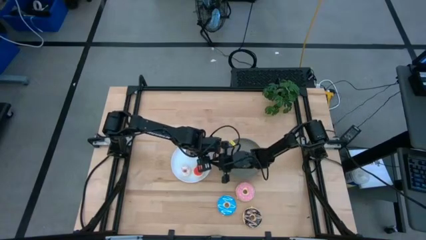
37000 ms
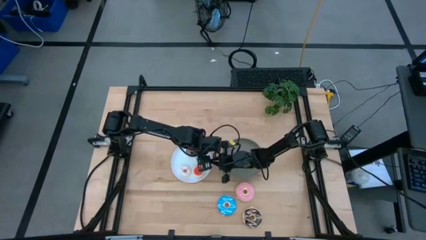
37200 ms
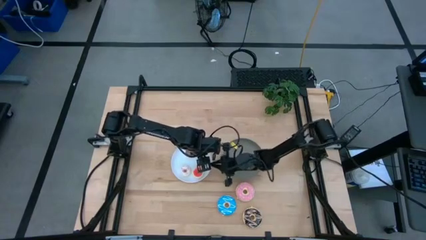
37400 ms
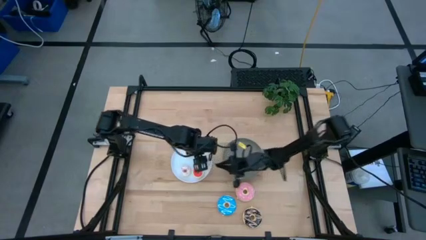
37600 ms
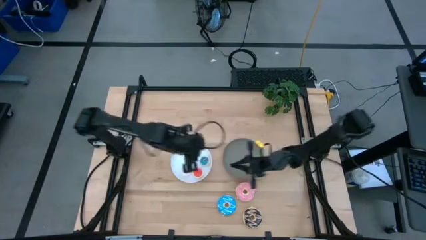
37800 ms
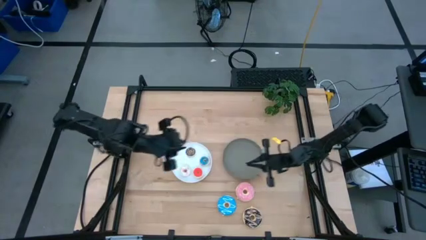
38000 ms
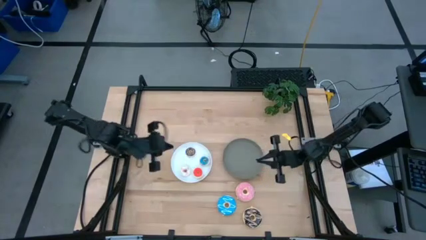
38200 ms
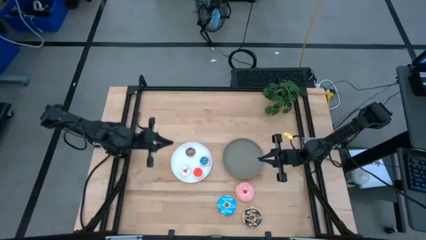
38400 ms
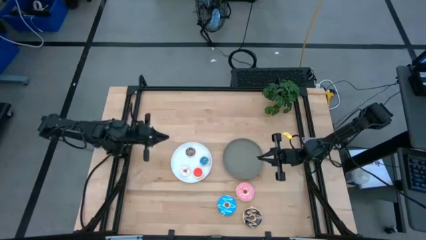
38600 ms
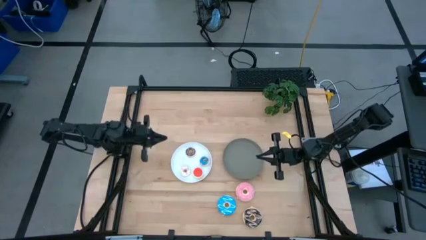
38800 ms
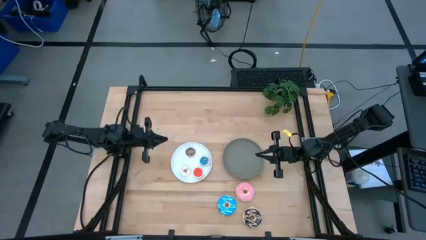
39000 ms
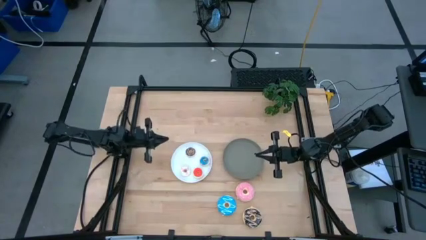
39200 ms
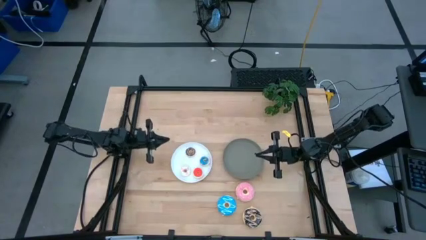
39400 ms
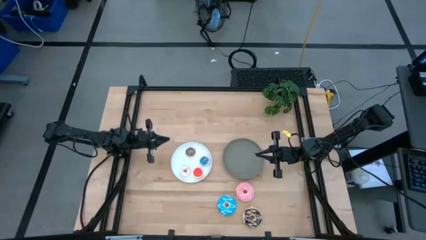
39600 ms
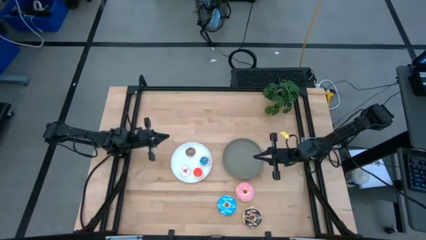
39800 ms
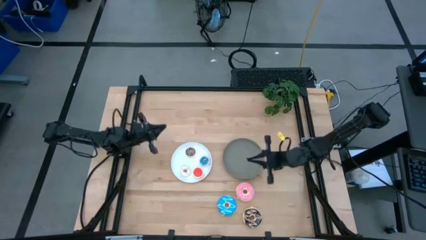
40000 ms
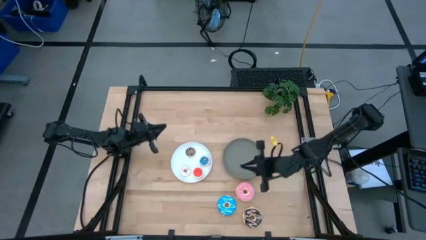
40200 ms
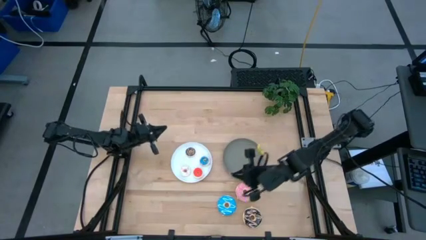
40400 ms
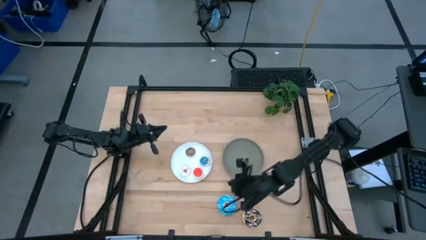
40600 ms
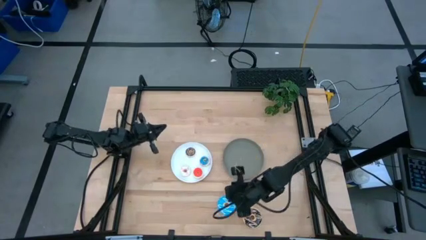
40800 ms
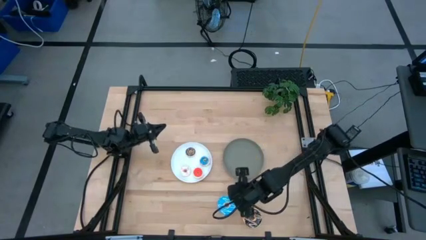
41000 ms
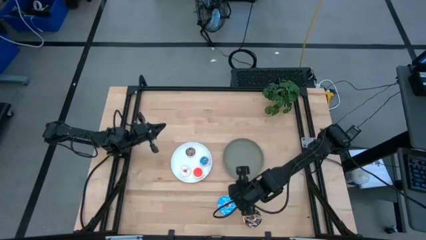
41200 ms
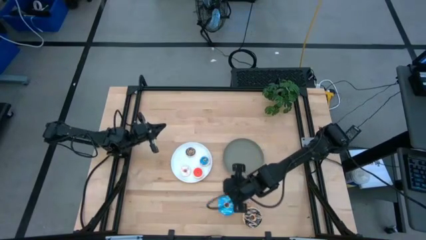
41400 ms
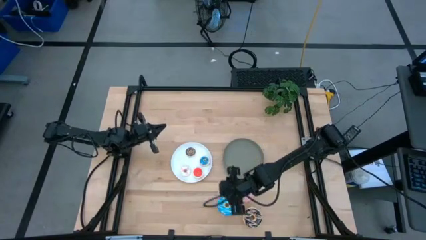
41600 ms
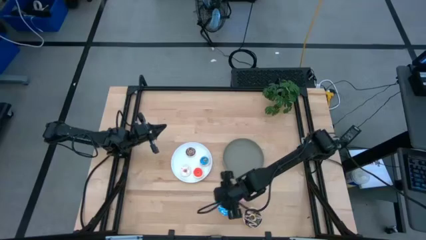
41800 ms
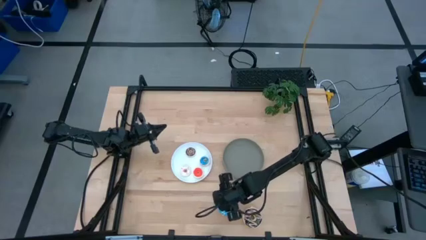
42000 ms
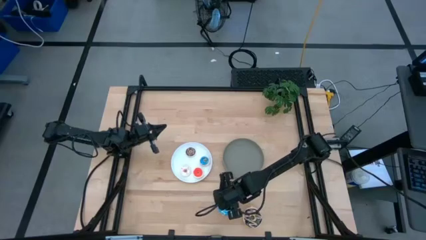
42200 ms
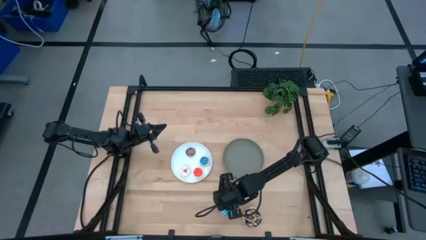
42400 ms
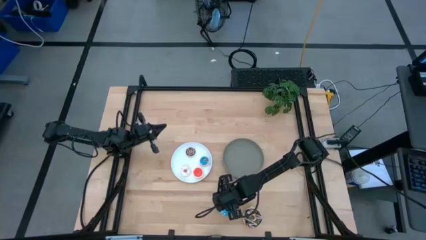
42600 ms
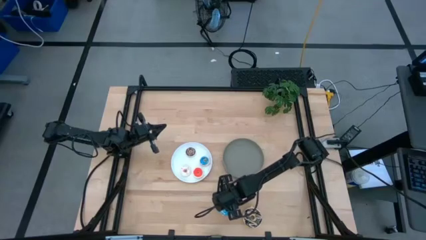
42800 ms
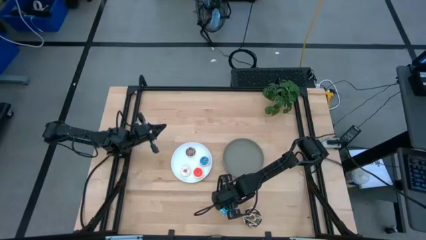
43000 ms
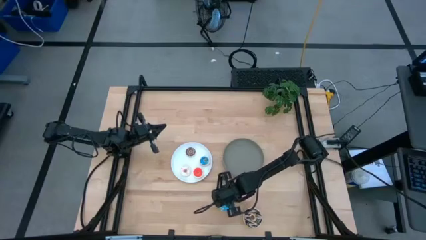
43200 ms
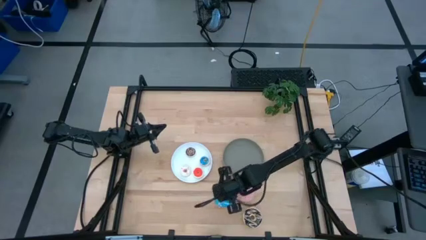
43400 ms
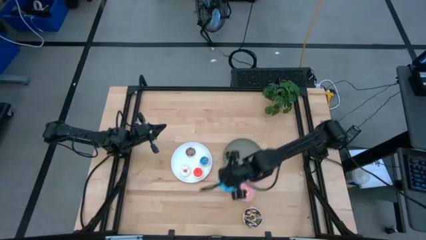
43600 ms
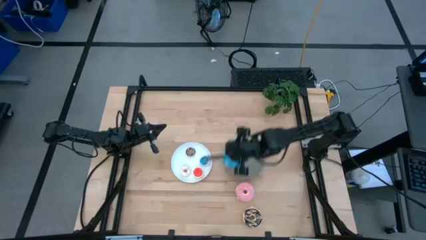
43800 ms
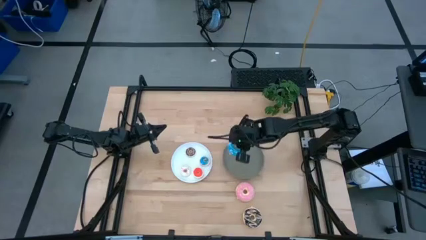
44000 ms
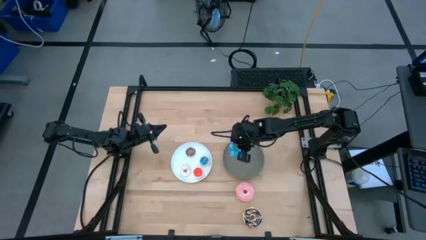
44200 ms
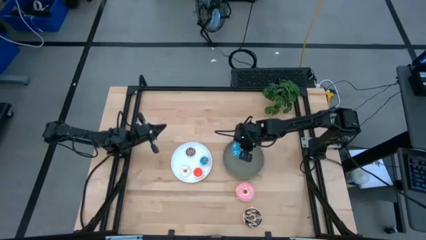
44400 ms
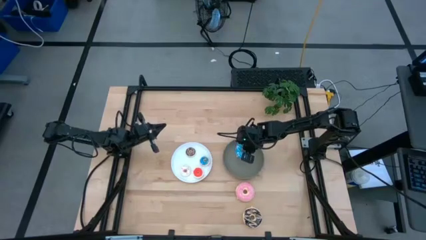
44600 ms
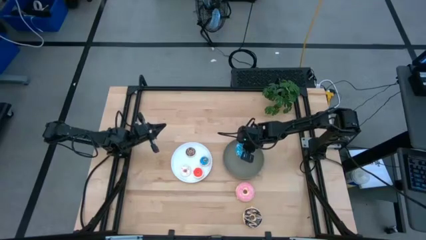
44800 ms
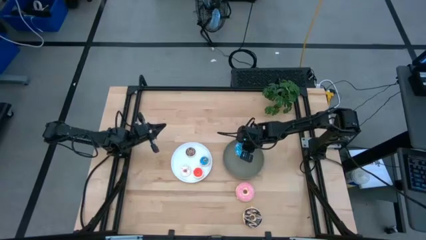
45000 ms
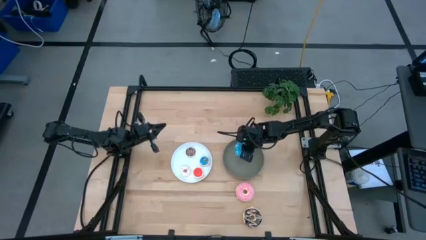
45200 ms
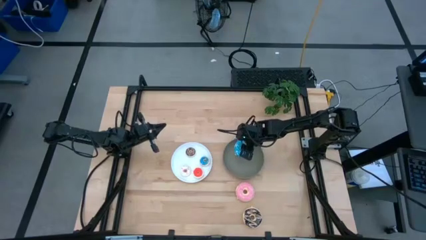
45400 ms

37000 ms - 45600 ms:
Task: Pick & Place donuts
Put the large blue donut on the gray plate

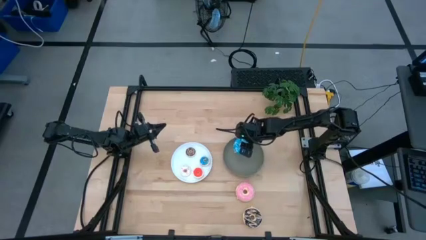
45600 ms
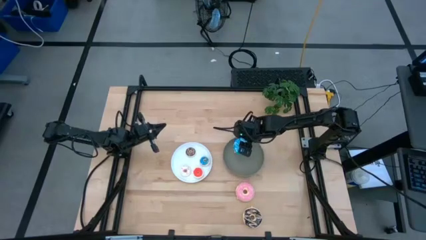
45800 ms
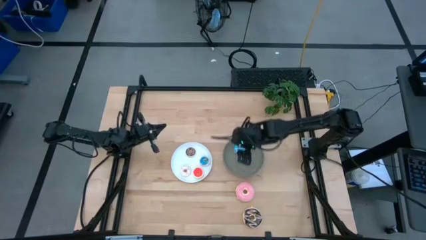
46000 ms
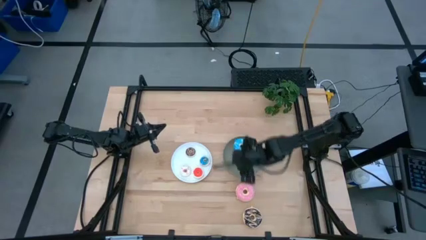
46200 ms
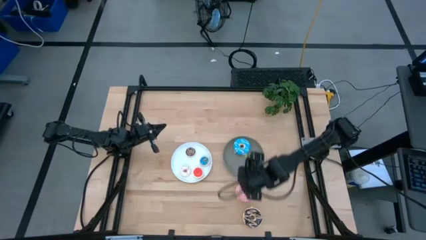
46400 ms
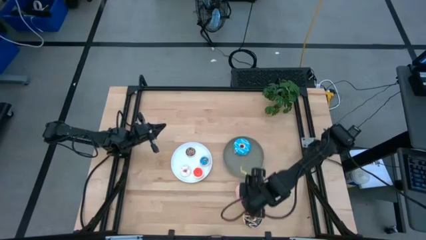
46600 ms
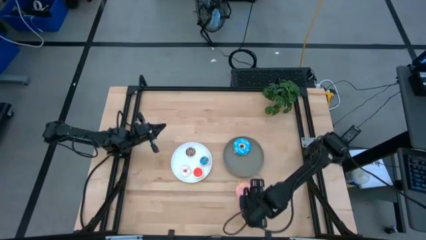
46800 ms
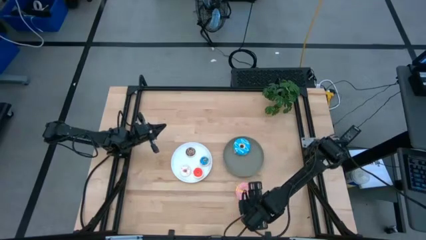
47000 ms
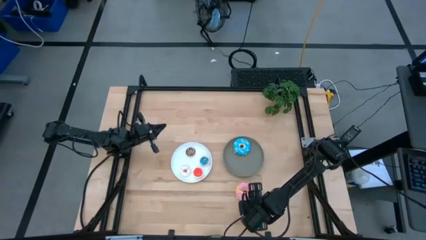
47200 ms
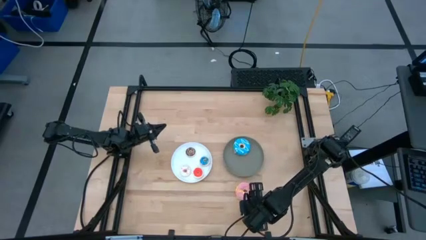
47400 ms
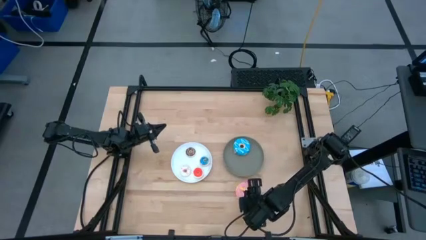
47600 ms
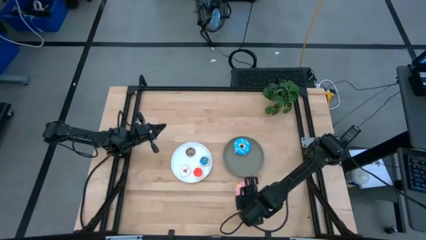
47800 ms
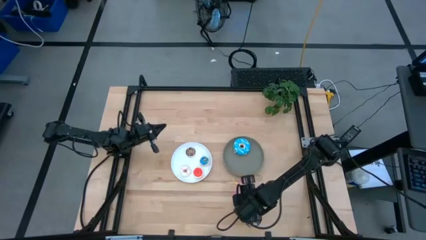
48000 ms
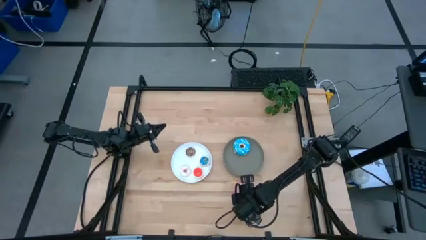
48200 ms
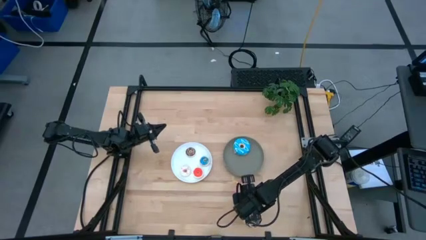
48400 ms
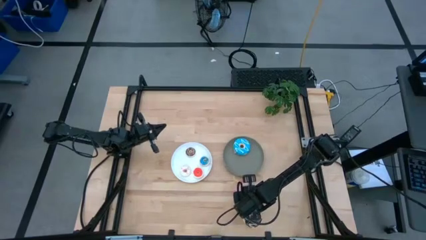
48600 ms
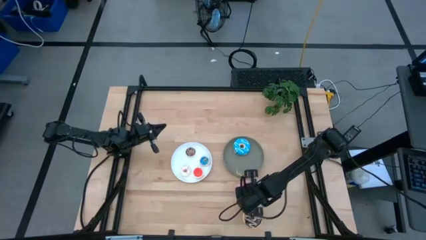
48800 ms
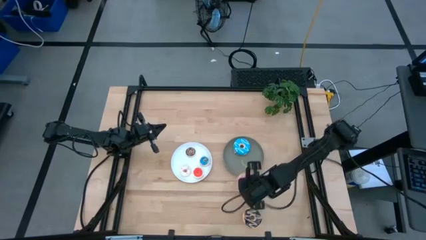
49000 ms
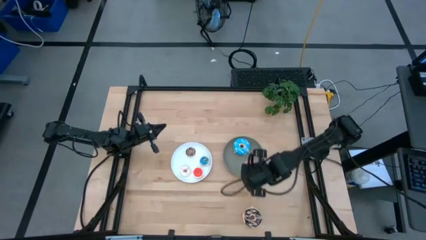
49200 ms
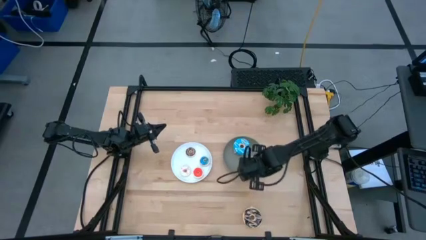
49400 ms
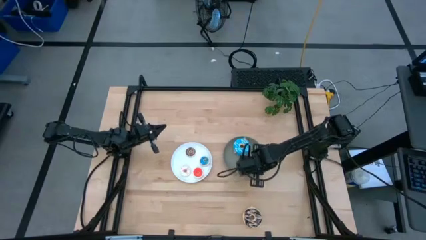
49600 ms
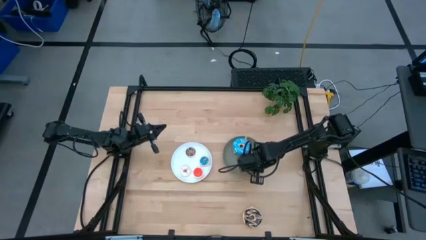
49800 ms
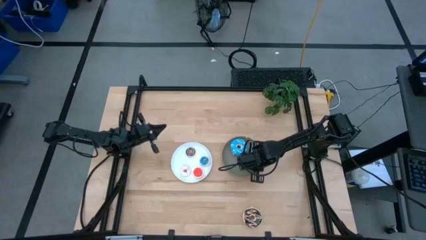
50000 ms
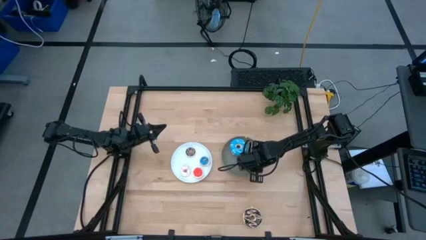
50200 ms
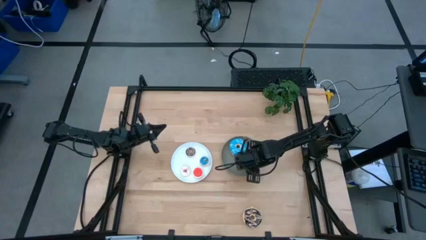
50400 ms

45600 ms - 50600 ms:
Put the large pink donut on the gray plate
